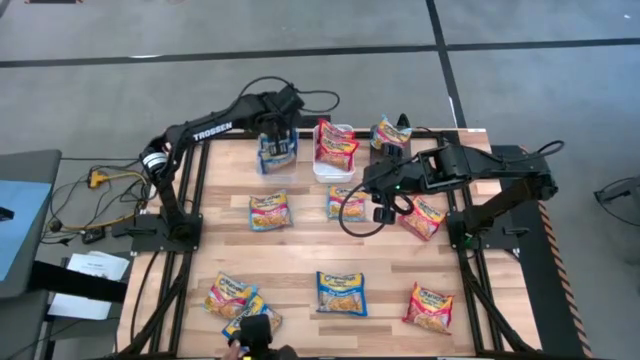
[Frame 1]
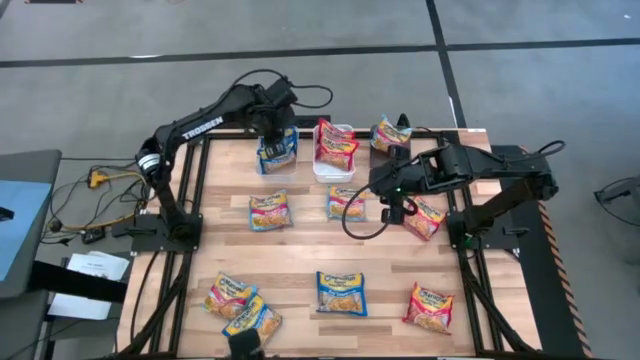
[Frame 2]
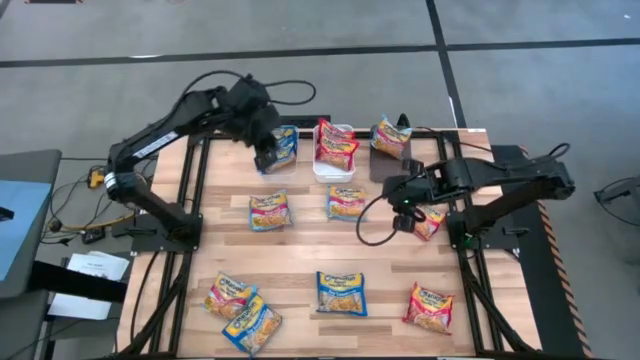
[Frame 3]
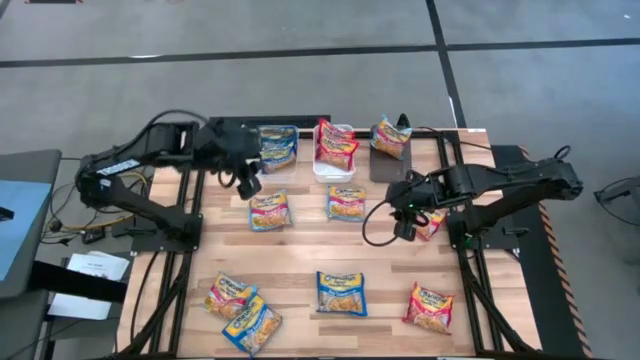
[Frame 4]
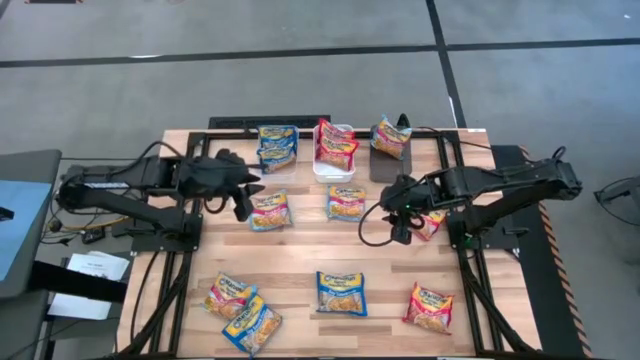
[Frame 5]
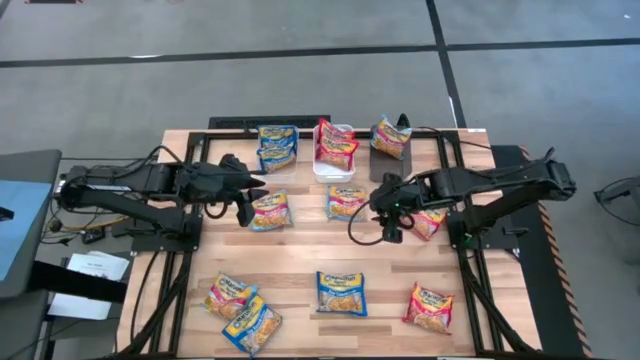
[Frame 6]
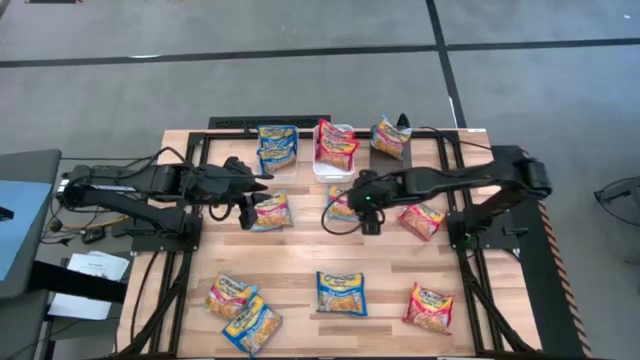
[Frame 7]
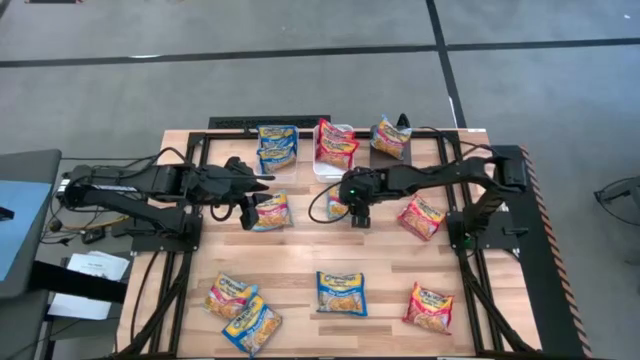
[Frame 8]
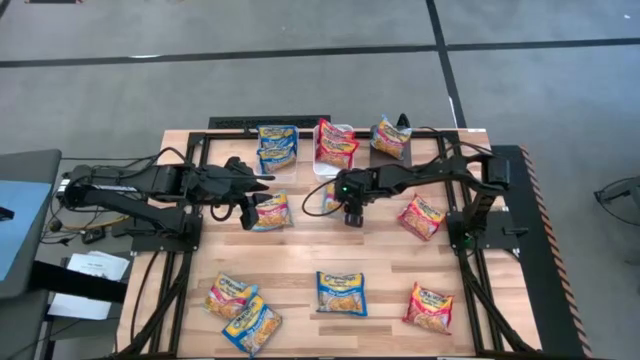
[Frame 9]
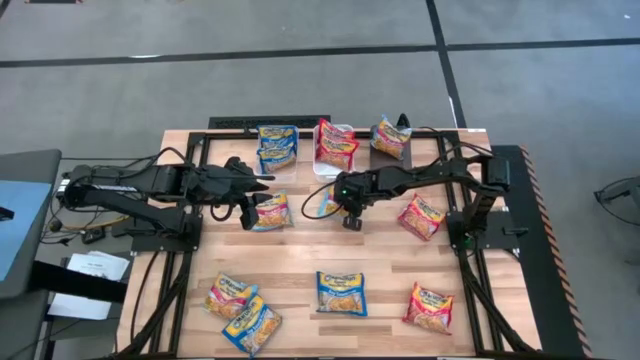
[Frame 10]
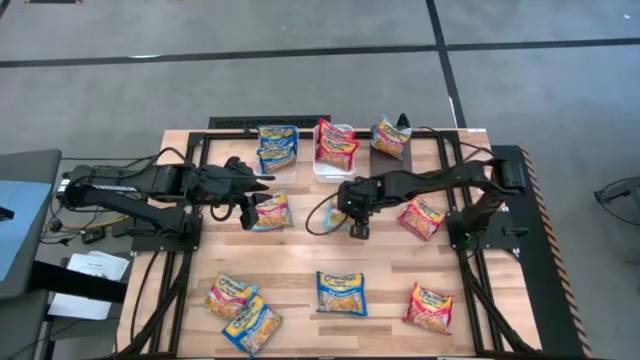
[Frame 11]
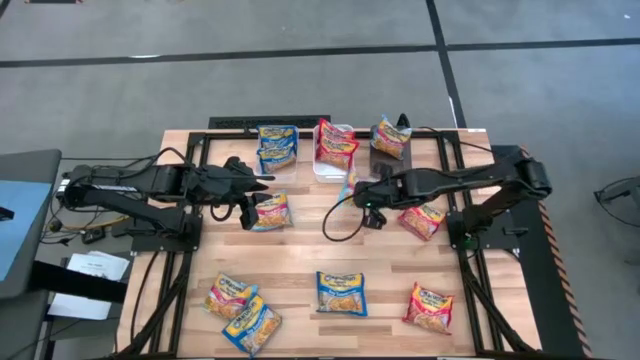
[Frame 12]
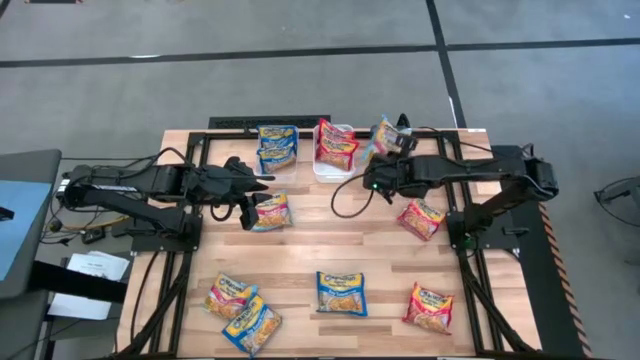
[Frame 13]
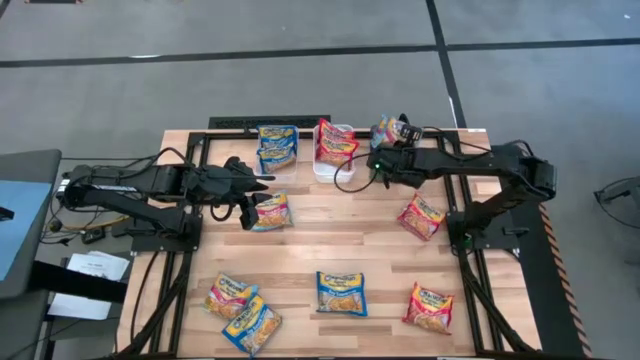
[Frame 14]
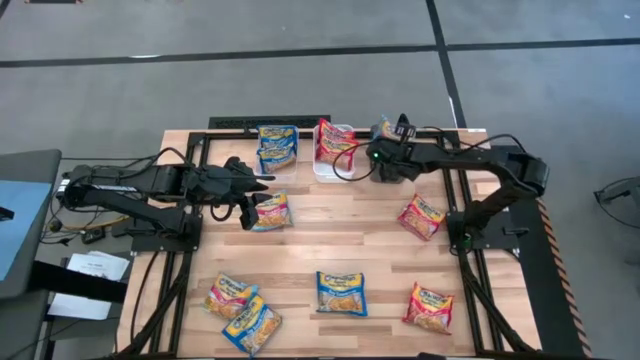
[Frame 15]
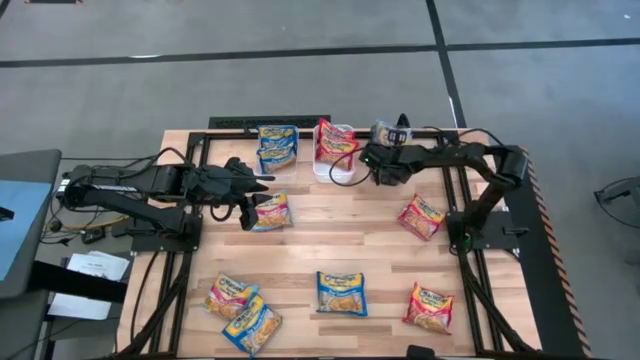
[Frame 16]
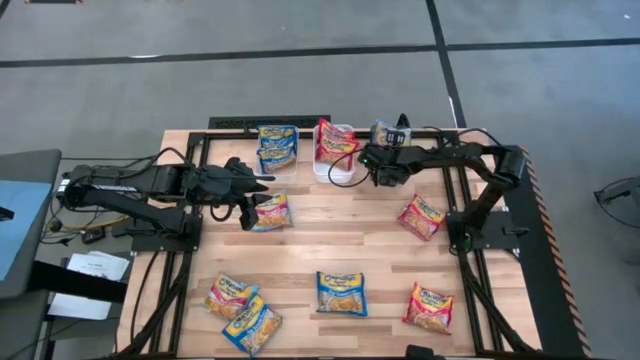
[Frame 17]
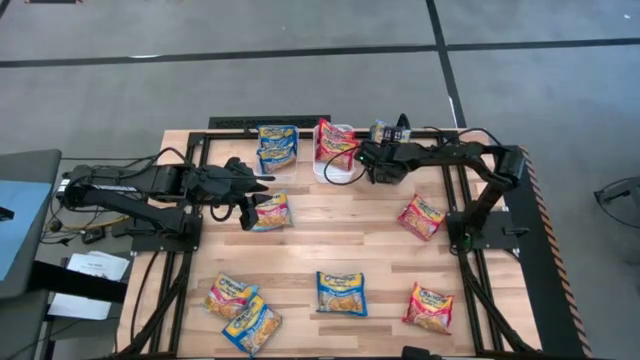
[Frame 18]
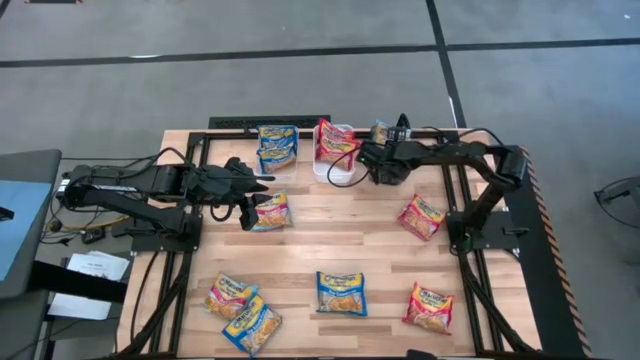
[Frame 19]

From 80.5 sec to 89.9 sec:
Task: Sort Maruchan noodles
Put the light blue noodle pack into the black bin

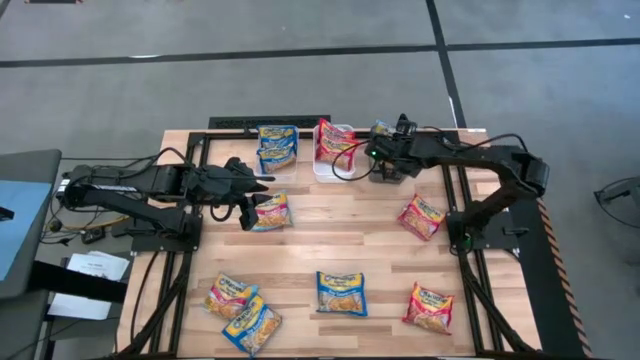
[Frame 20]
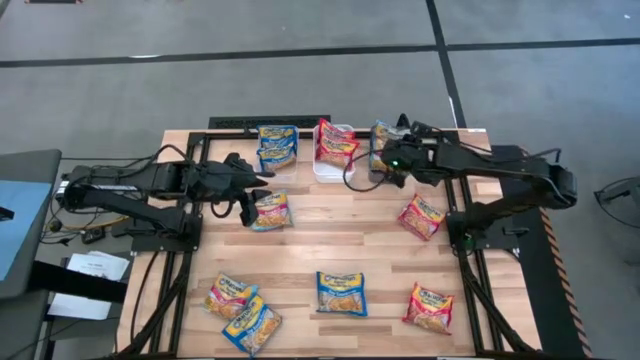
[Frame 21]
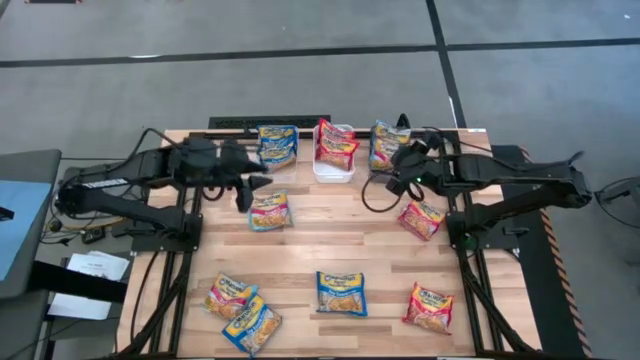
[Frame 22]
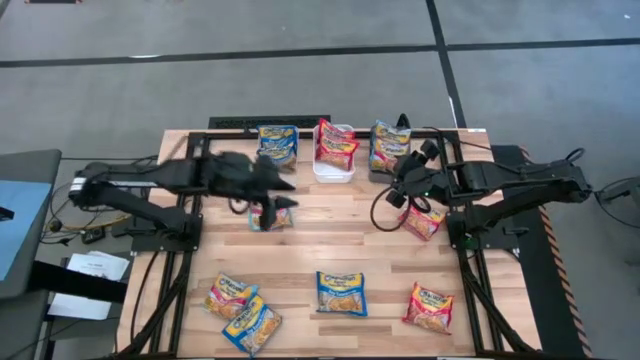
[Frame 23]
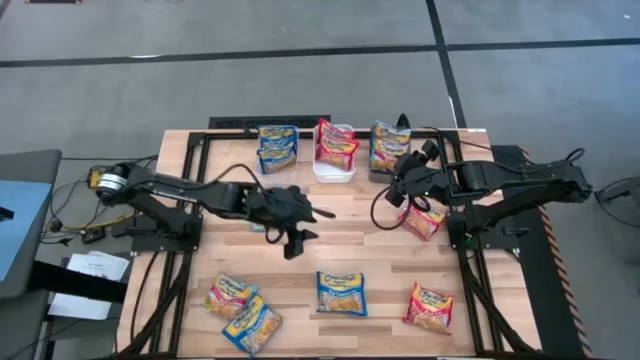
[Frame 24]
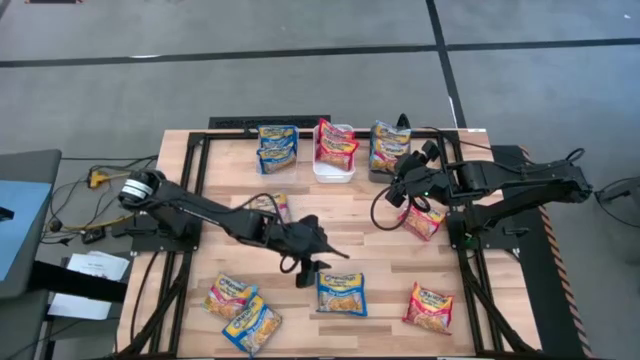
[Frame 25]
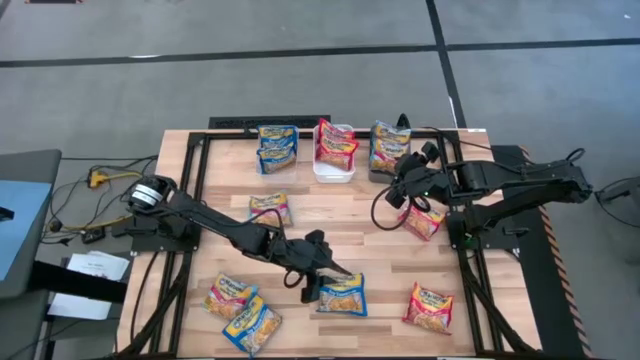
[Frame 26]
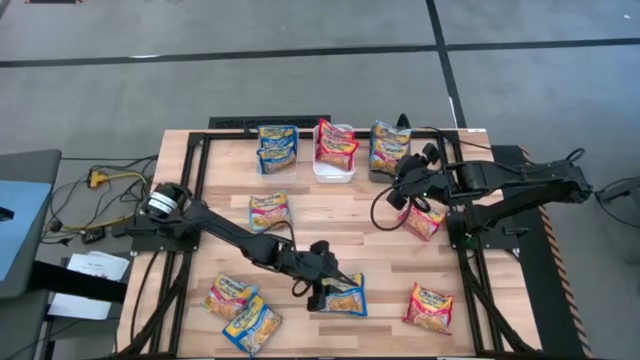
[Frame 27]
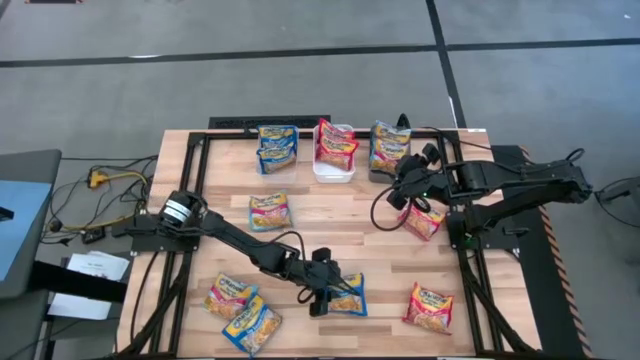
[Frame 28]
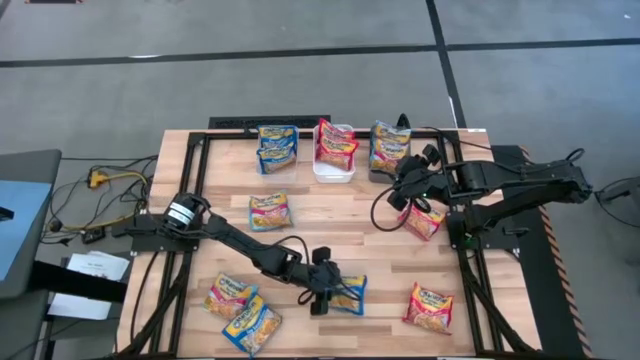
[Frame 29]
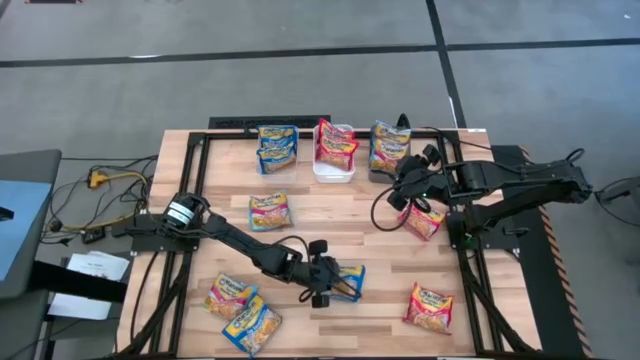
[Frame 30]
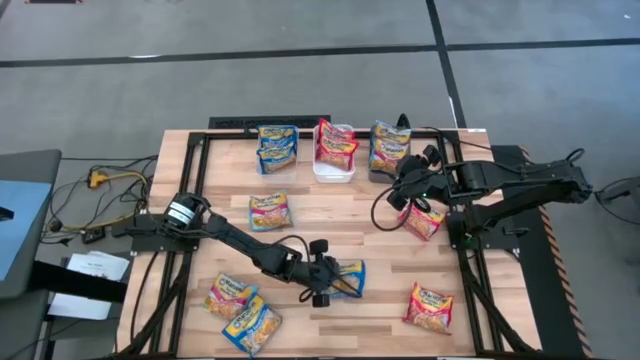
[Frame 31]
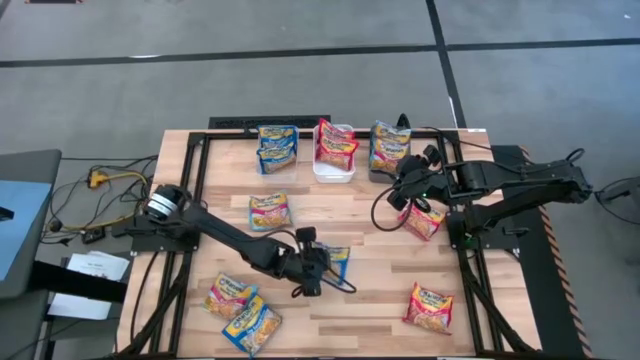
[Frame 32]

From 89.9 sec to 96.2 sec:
Put the blue noodle pack into the transparent bin

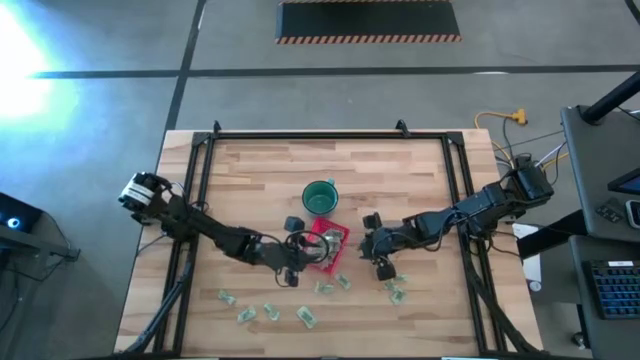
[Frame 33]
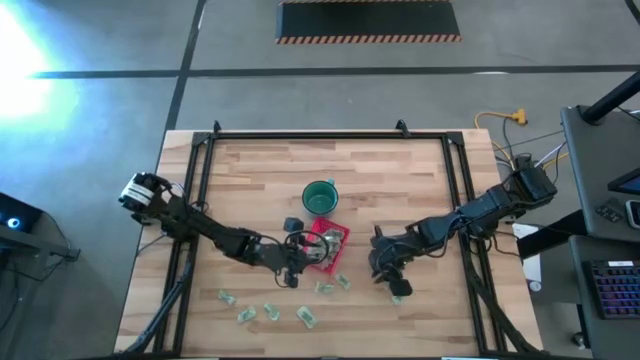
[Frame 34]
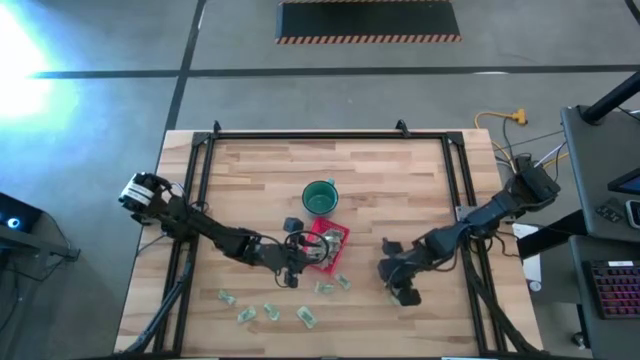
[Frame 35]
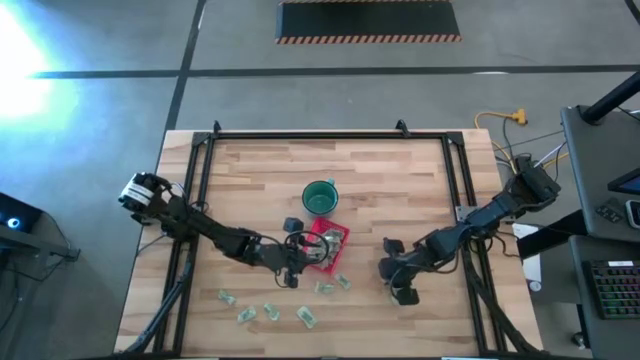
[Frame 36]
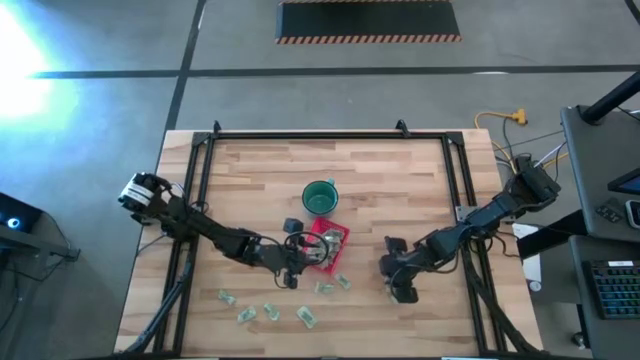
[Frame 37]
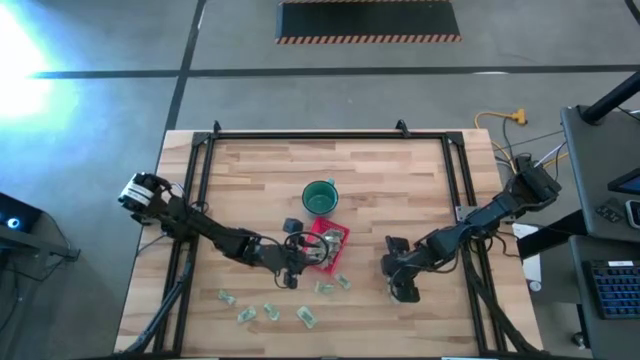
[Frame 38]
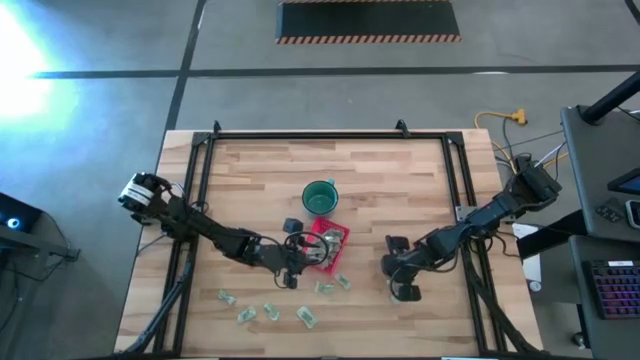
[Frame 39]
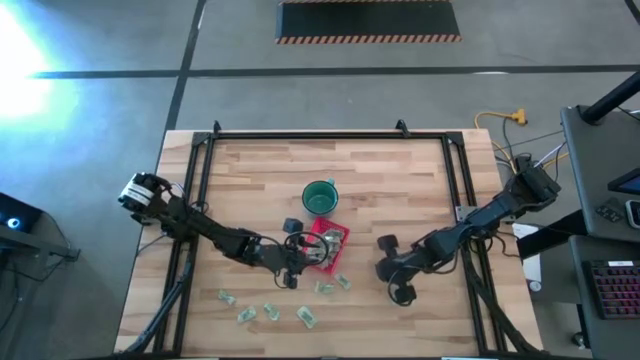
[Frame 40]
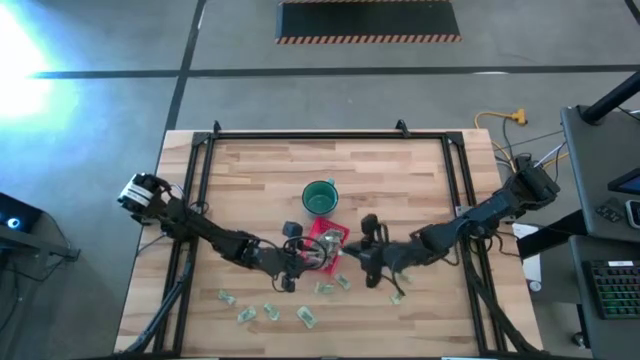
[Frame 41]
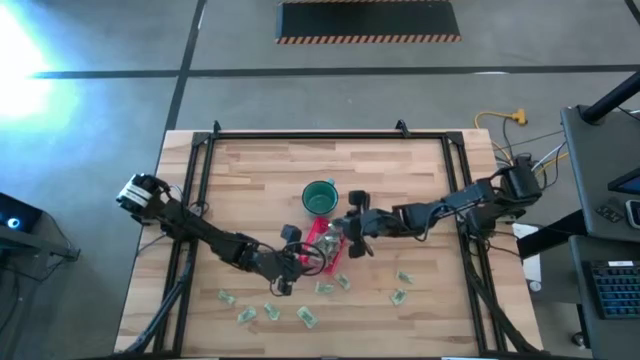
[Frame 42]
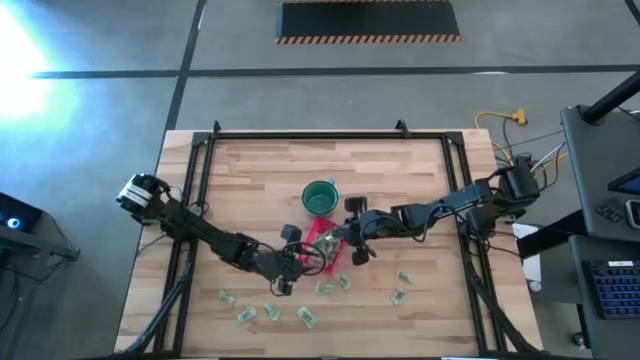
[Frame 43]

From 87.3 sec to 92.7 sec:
Task: Pick and place items into bin
Put the light green stevia packet into the red bin
